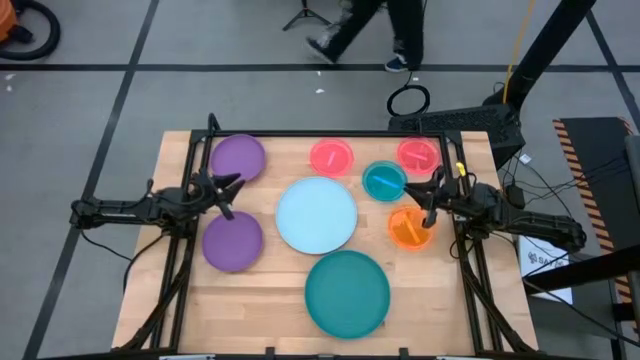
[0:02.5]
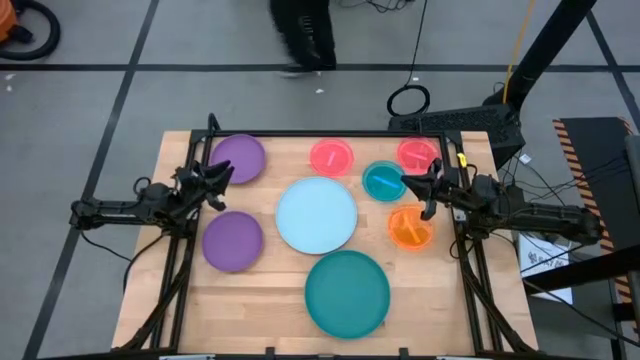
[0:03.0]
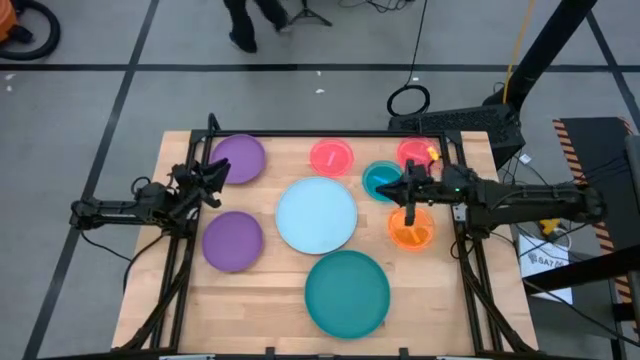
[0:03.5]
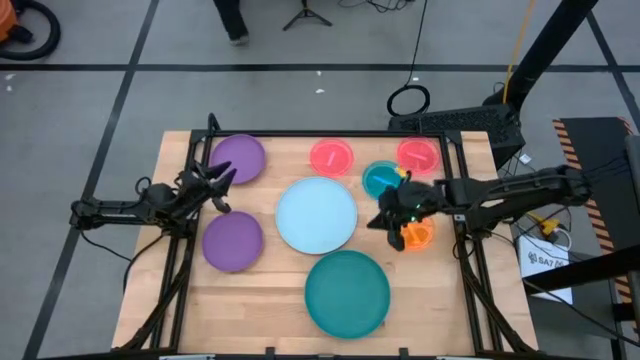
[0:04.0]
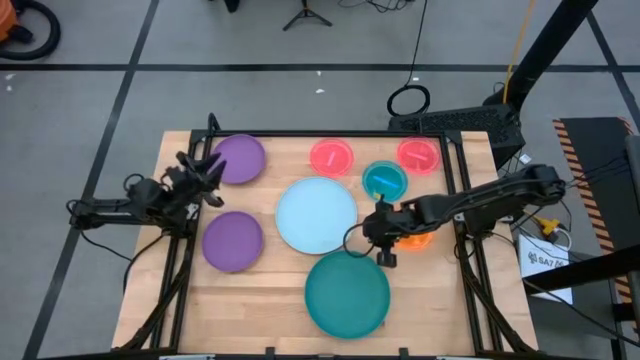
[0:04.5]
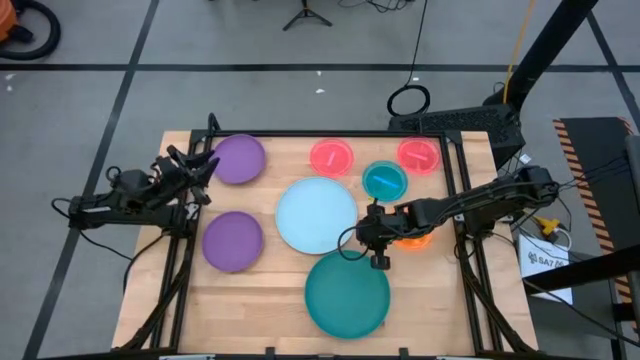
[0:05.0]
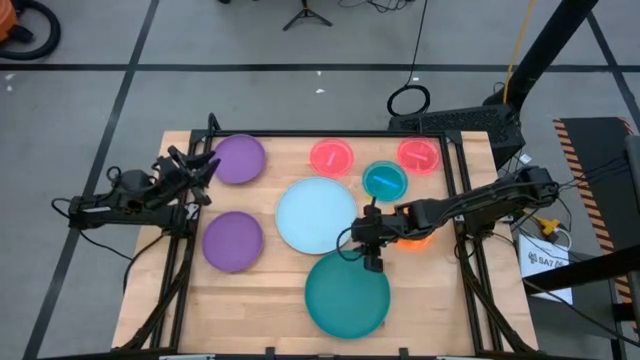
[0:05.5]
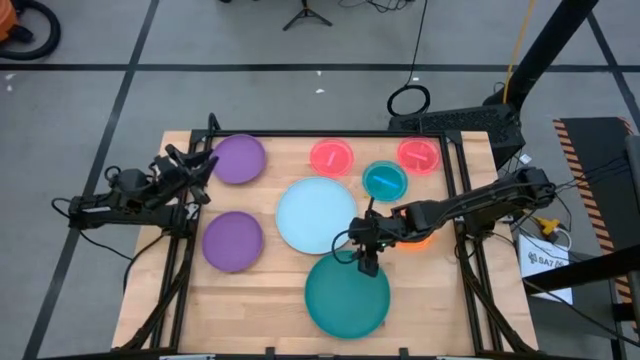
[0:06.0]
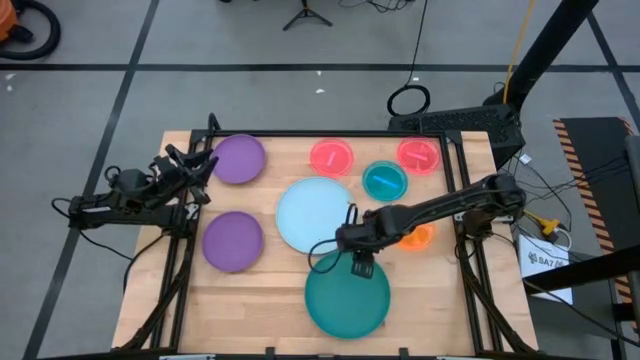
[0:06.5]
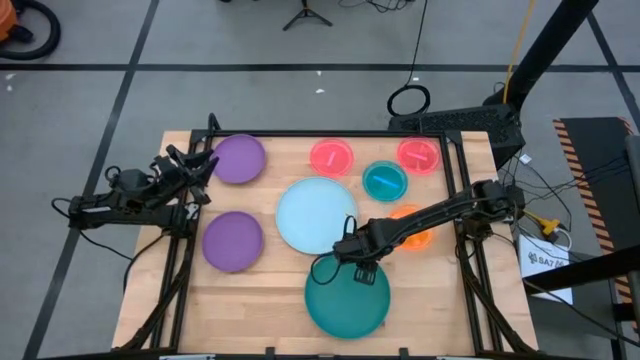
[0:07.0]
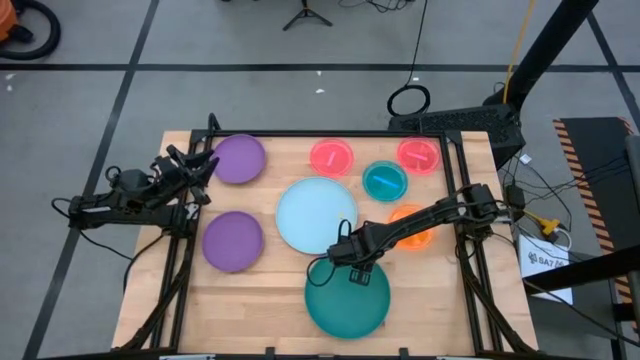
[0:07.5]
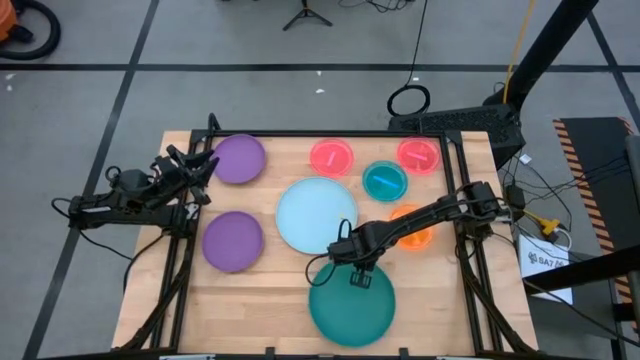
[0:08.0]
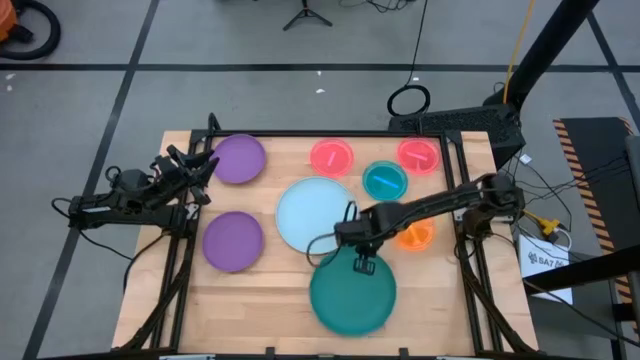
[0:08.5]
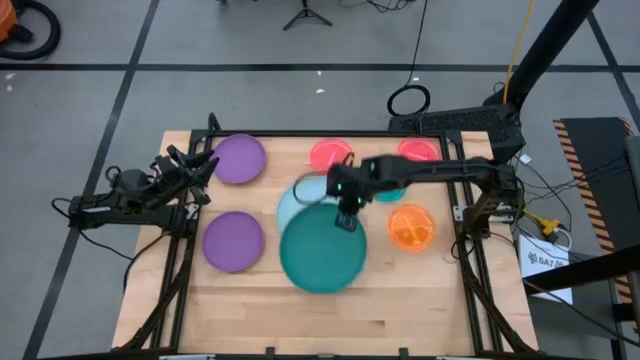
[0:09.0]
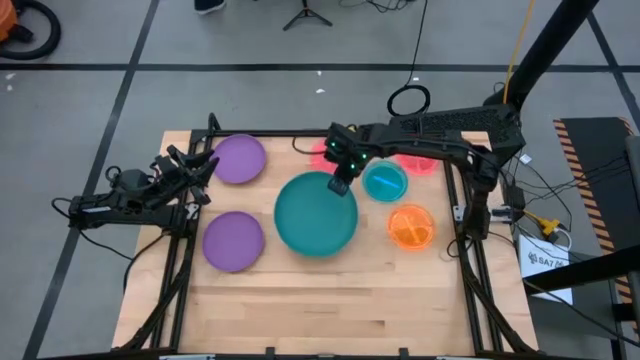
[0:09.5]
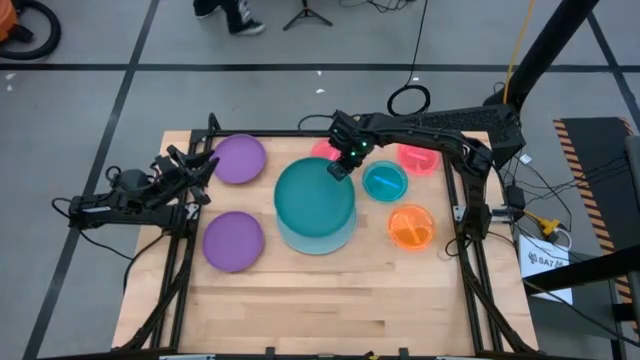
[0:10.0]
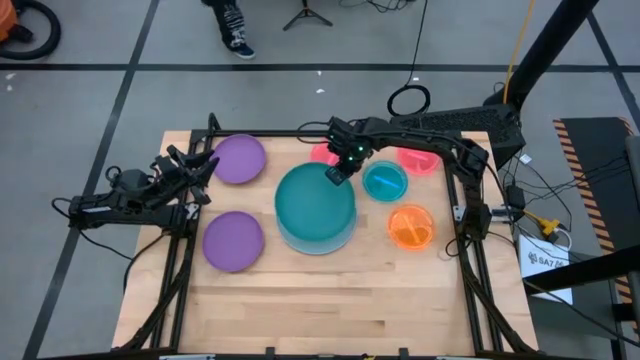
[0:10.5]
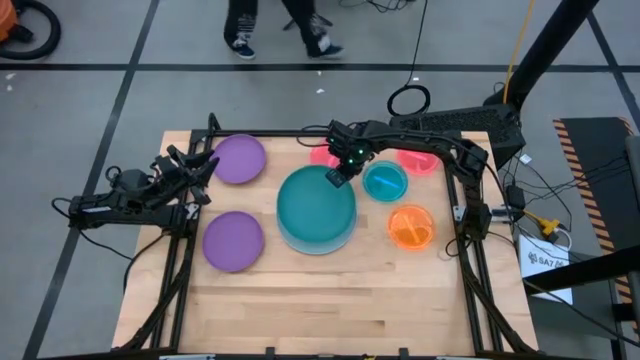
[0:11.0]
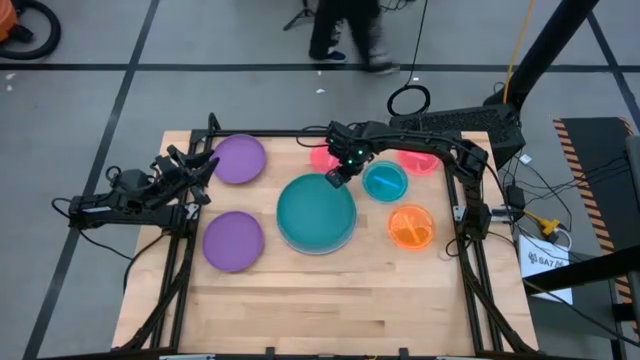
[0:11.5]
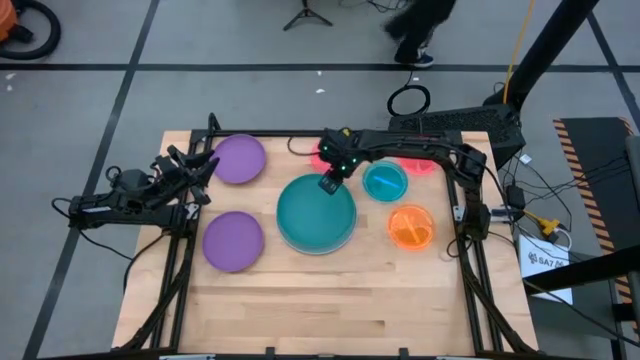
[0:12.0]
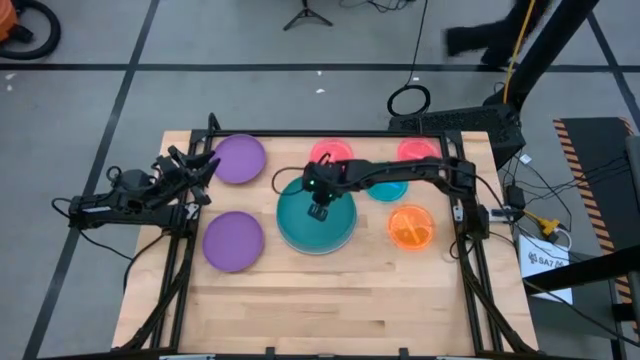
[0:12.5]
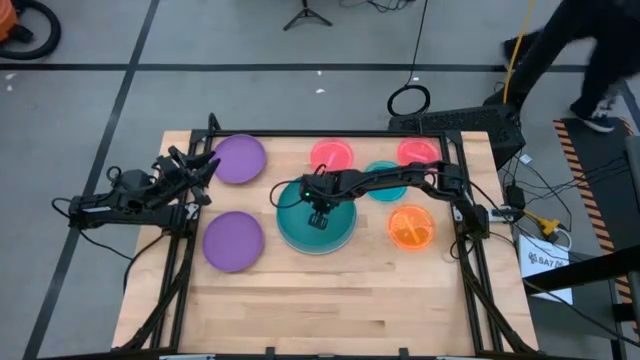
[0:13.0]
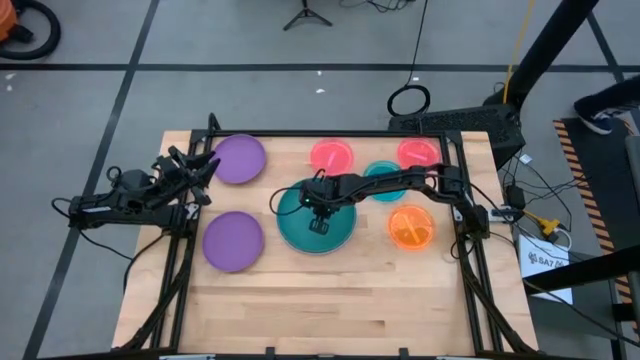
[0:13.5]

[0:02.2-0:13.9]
Task: Stack plastic plates
Stack the green plate on the light blue plate

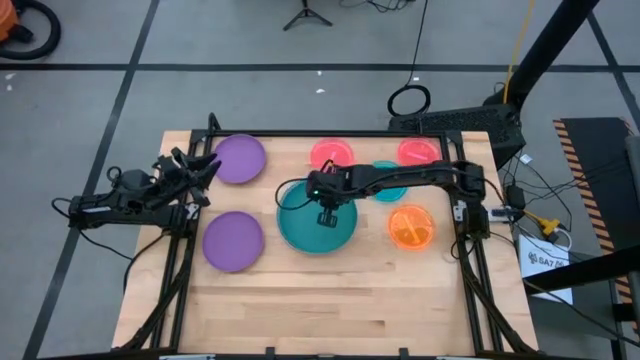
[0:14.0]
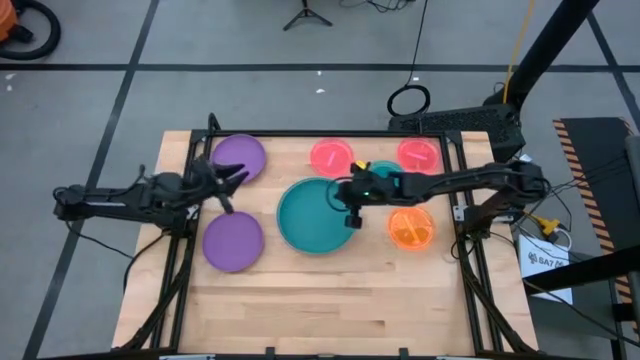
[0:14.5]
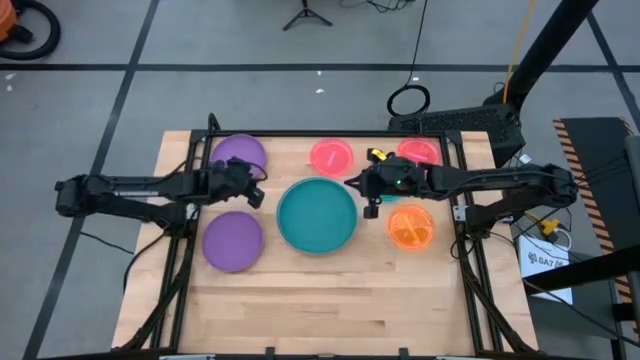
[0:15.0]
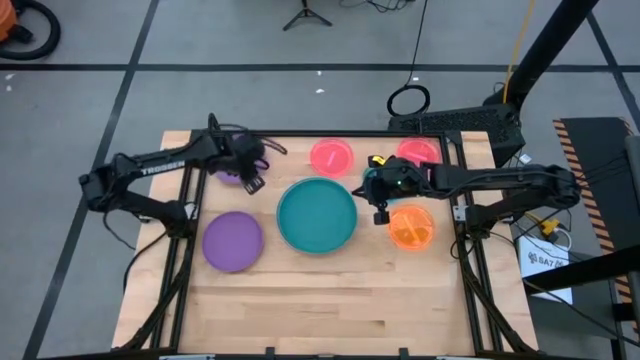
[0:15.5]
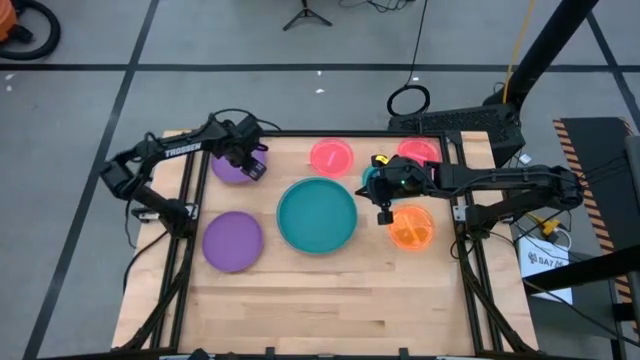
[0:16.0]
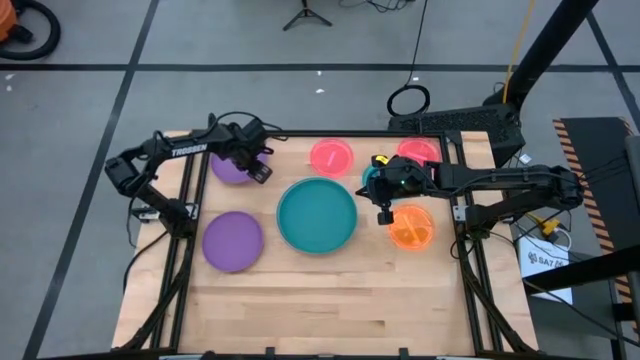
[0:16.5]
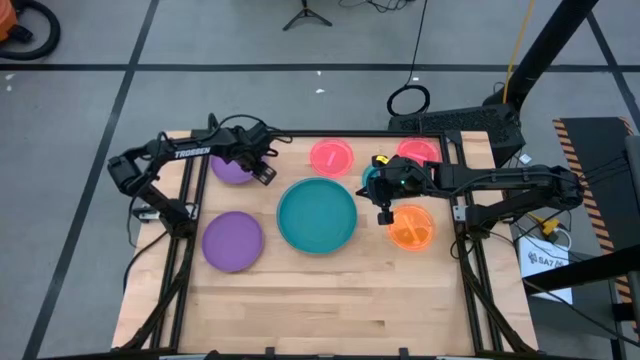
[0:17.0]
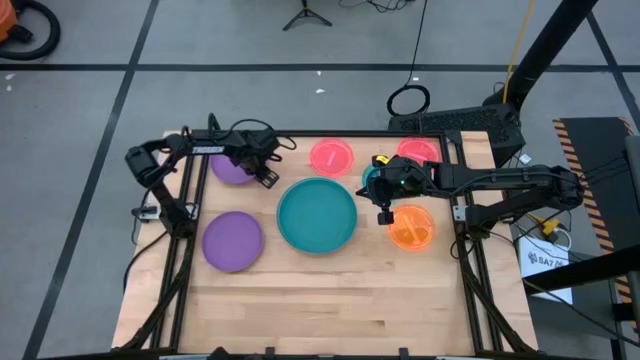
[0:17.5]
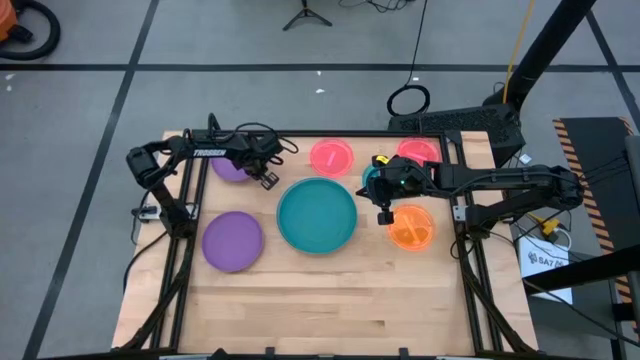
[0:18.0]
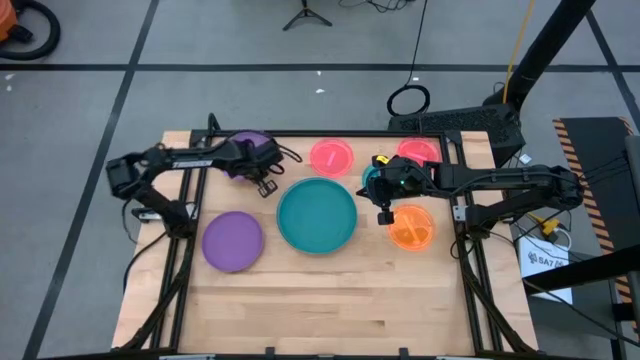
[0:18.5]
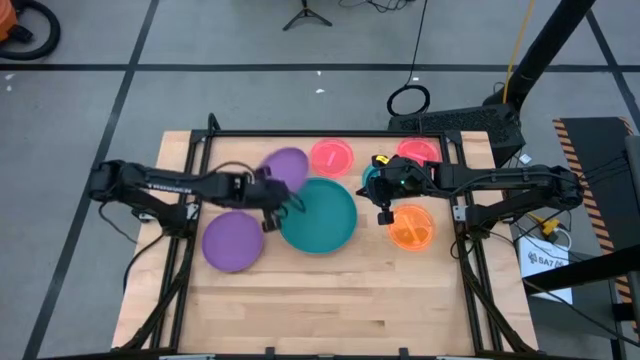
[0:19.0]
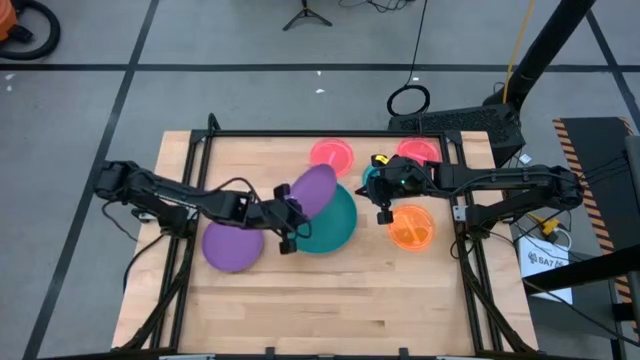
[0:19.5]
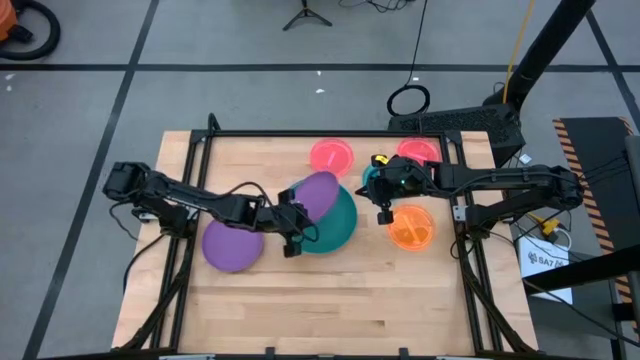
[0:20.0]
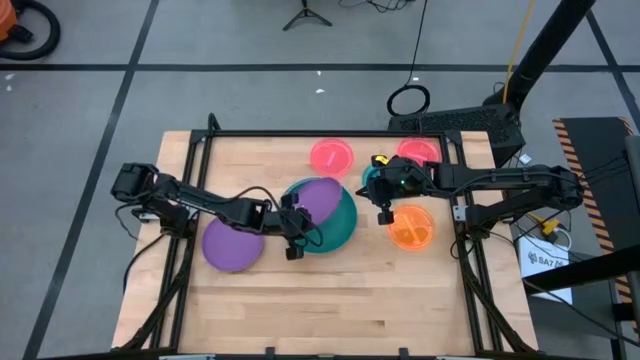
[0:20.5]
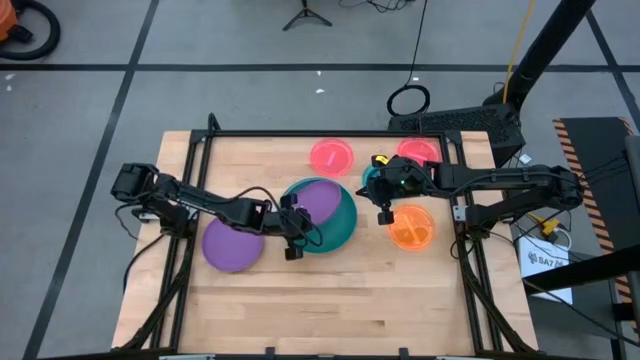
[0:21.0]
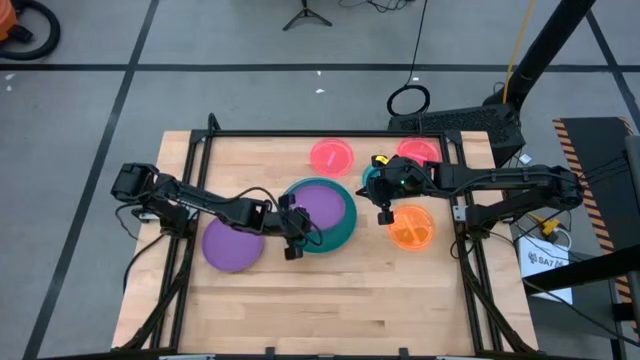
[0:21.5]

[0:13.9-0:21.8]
Stack the top violet plate on the green plate
